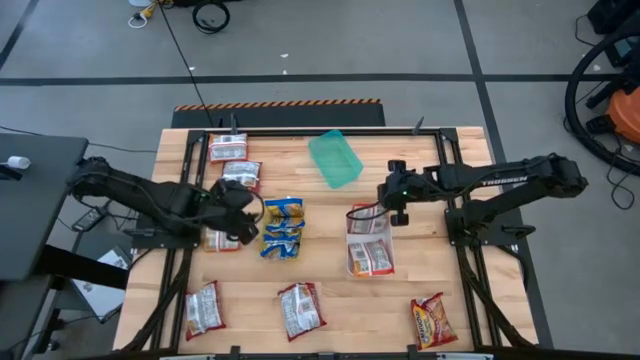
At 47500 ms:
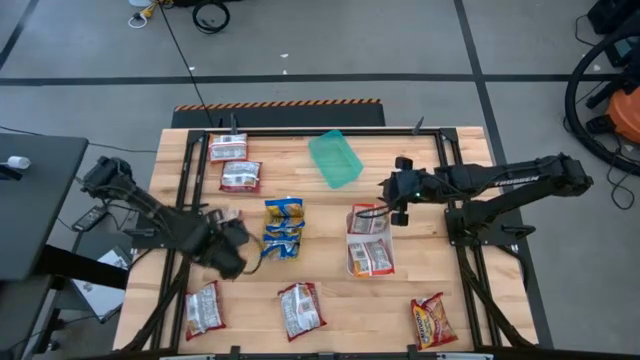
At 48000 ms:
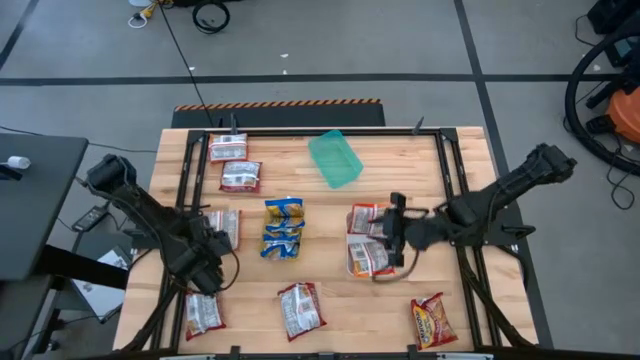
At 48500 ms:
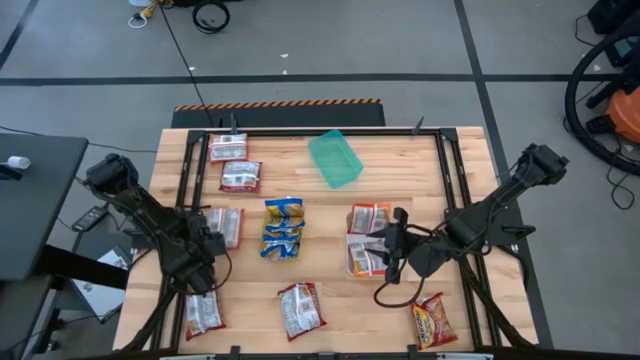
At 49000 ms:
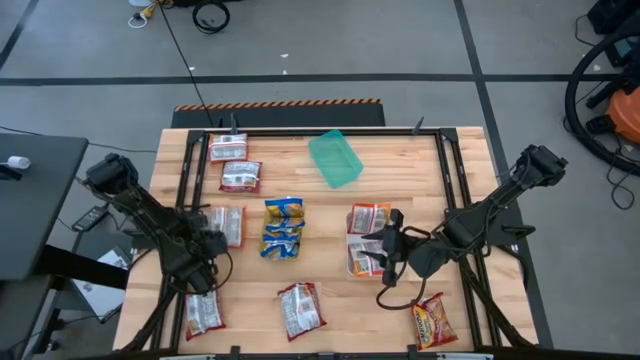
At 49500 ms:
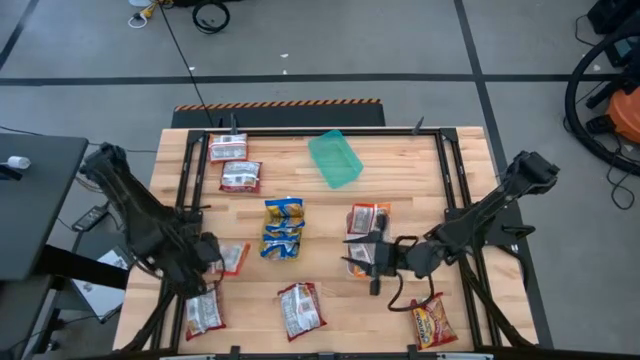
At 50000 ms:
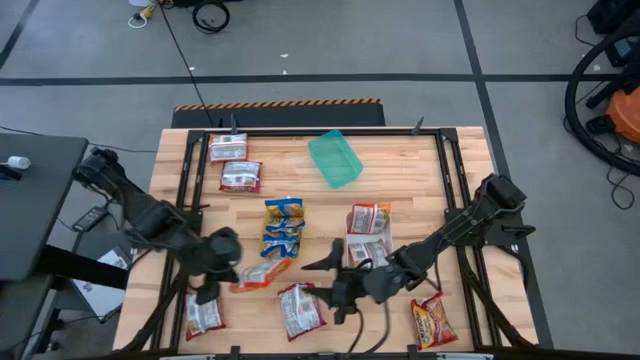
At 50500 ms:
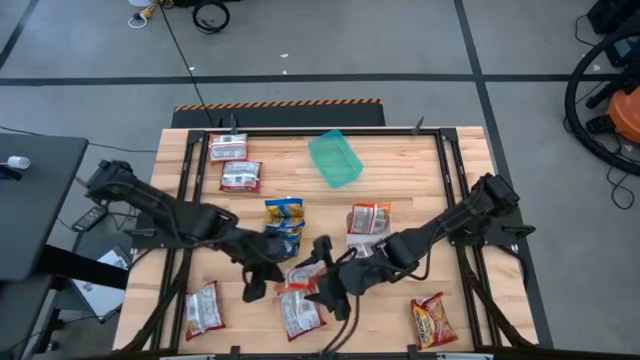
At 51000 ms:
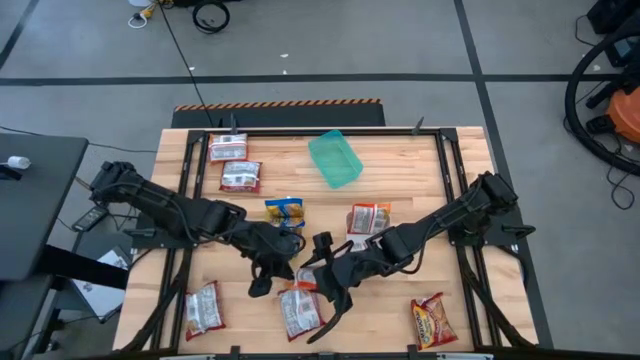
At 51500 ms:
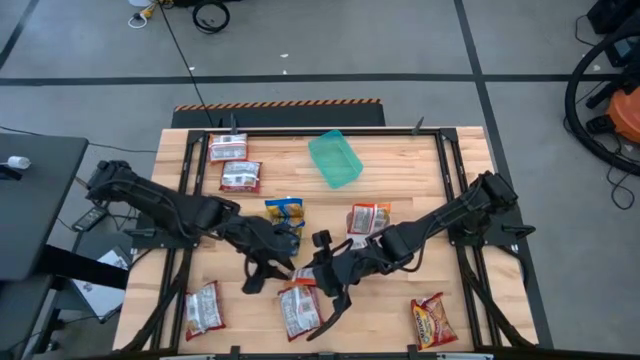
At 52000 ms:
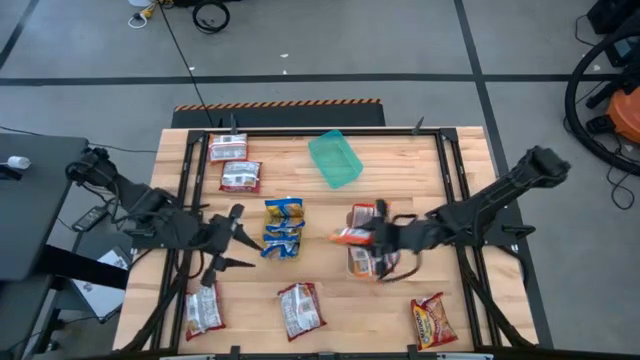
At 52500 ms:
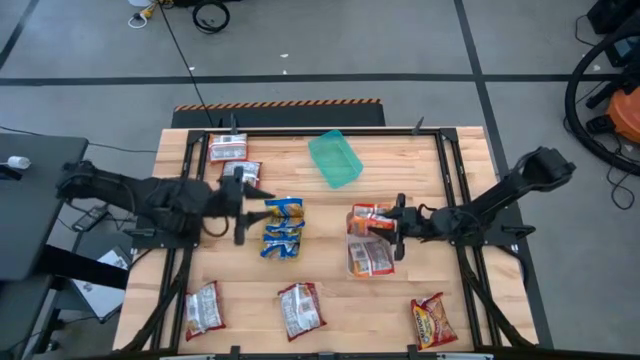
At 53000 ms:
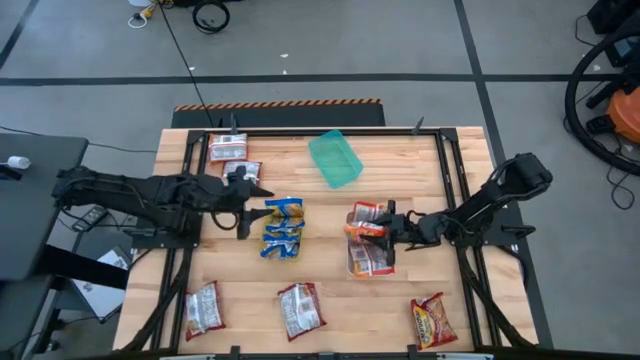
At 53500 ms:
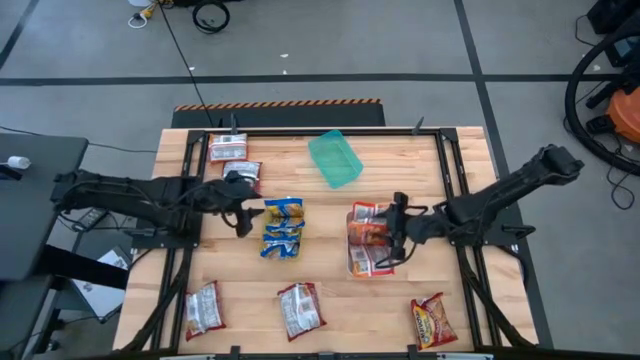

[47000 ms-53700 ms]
Task: Sort Maruchan noodles
Put the bottom left orange noodle pack into the white bin

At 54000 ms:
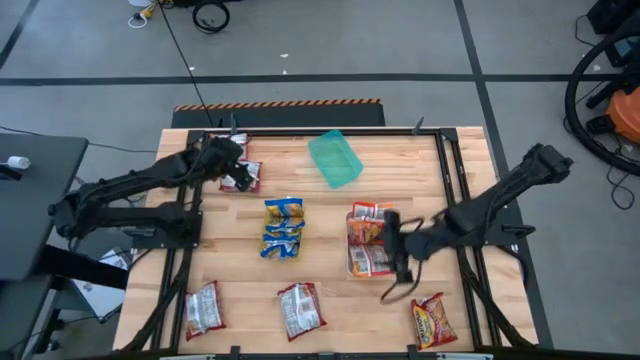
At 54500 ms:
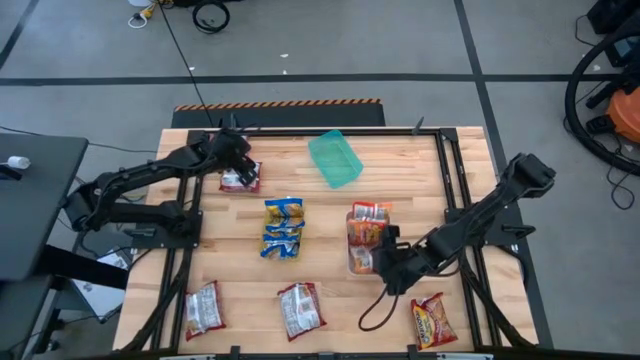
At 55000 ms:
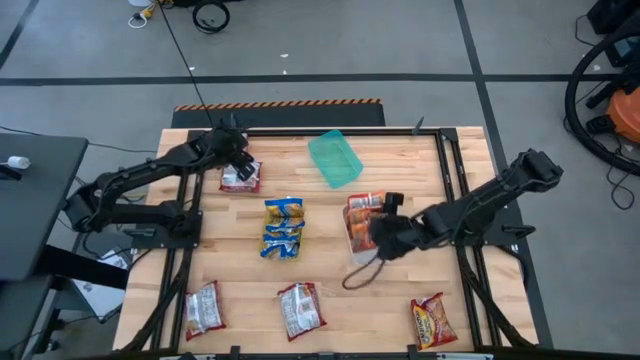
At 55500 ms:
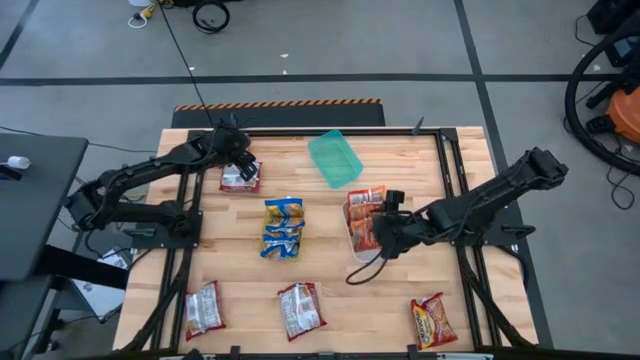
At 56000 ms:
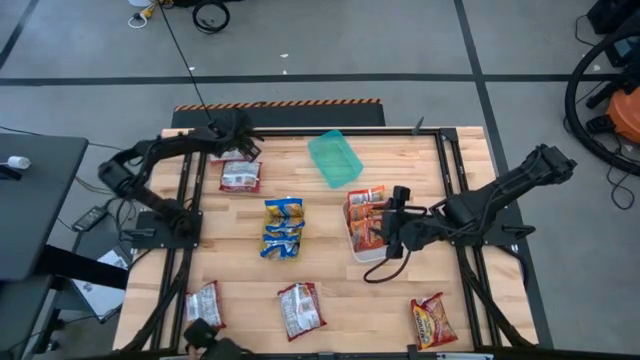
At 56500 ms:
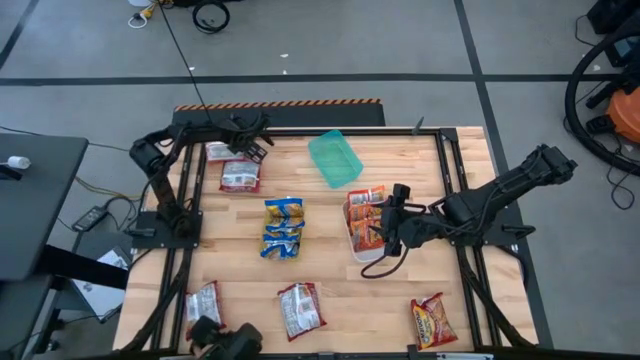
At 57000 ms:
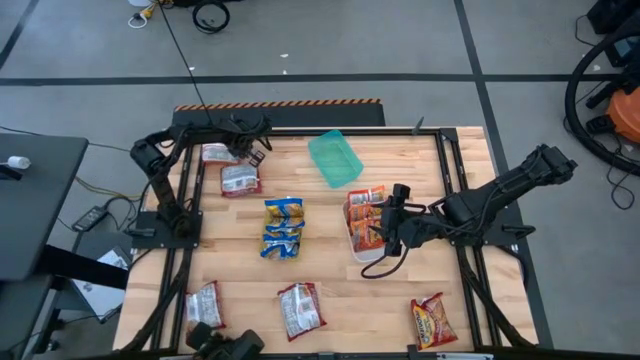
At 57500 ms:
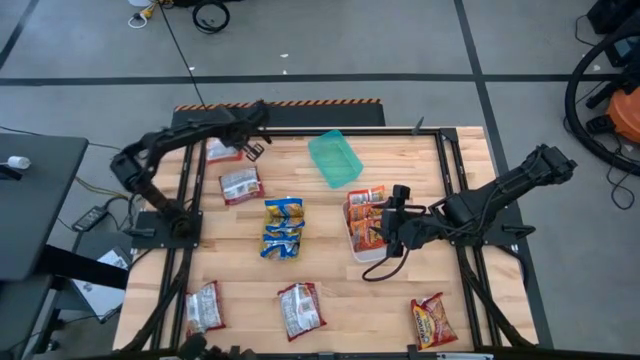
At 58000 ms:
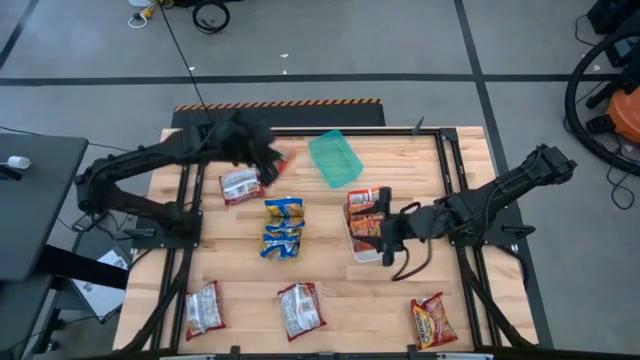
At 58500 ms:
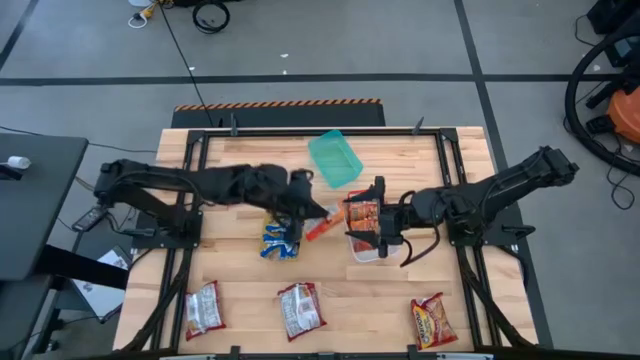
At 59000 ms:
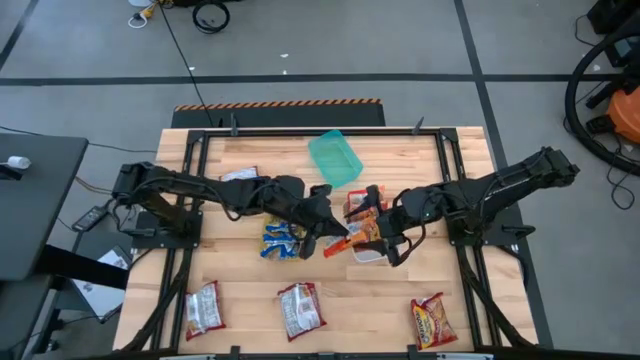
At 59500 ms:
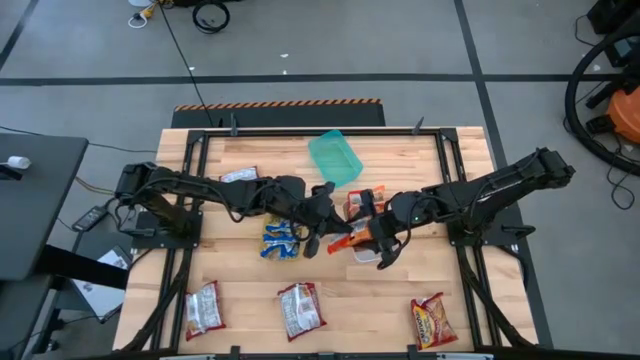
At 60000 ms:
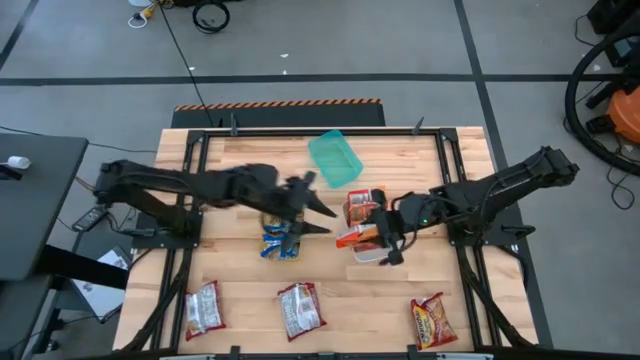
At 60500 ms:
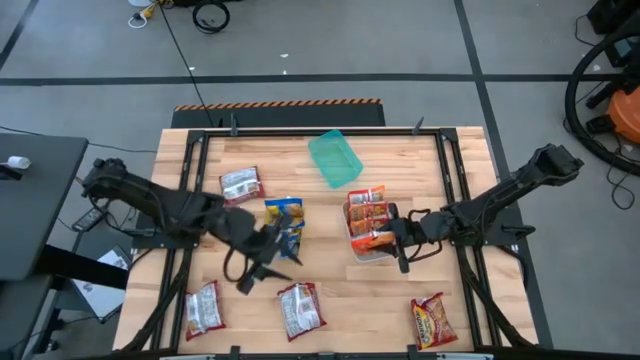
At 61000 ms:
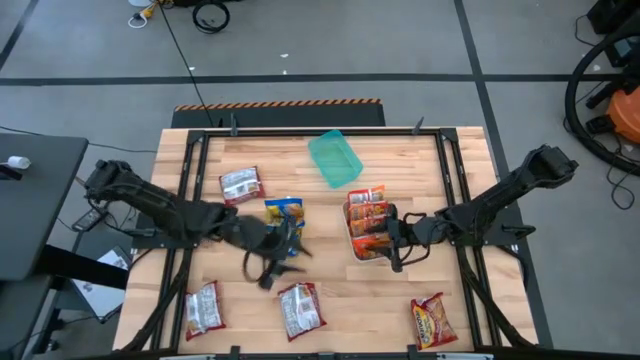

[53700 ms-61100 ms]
Put the orange noodle pack into the white bin

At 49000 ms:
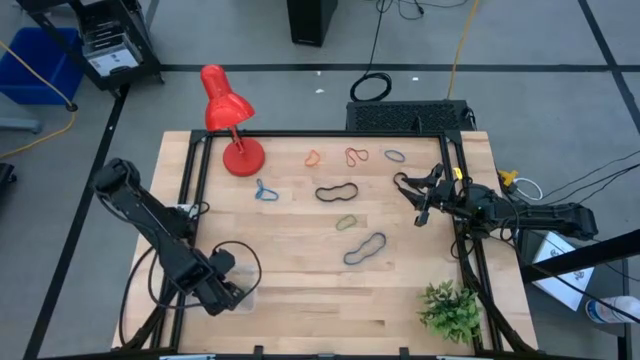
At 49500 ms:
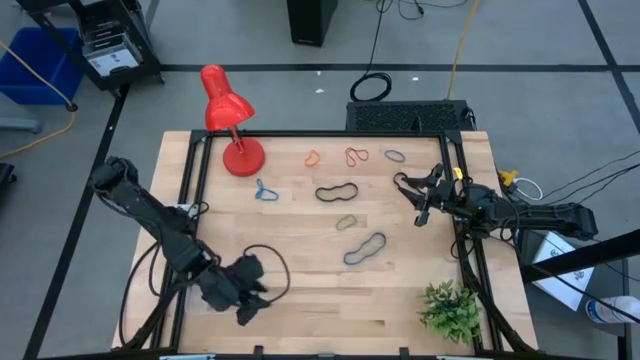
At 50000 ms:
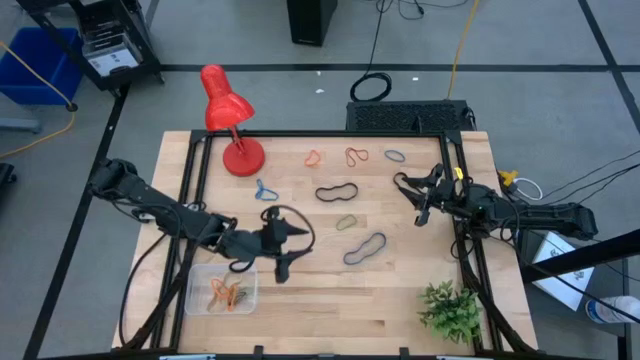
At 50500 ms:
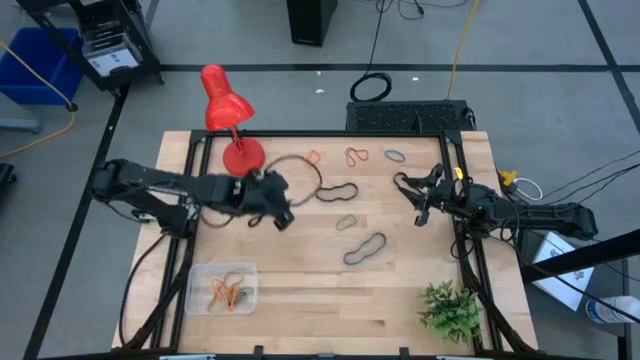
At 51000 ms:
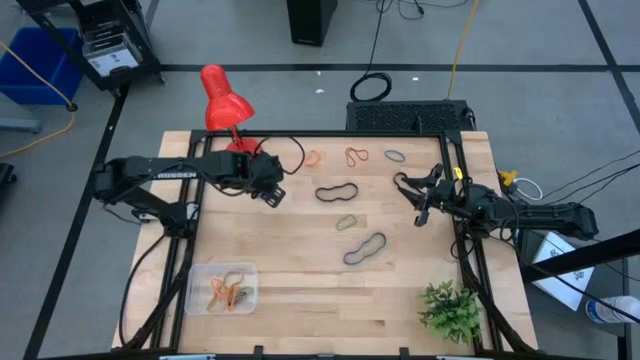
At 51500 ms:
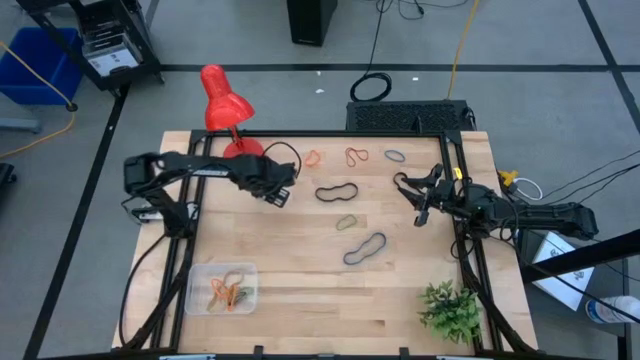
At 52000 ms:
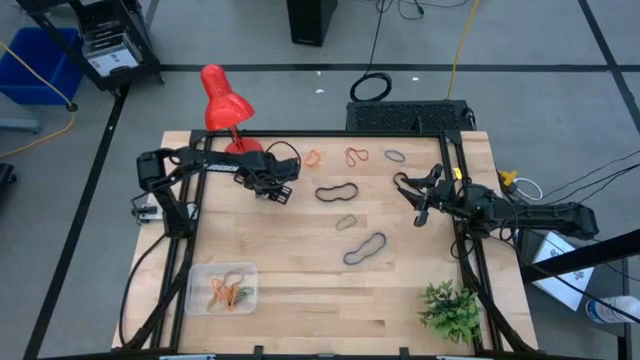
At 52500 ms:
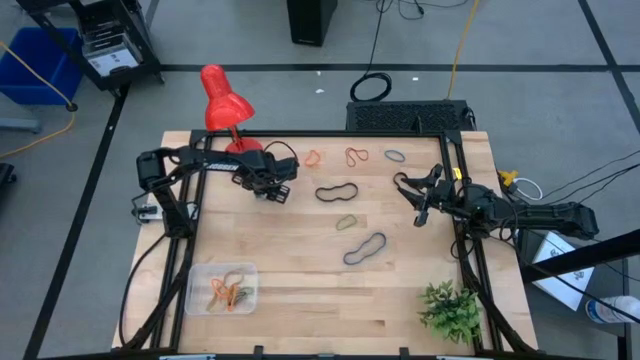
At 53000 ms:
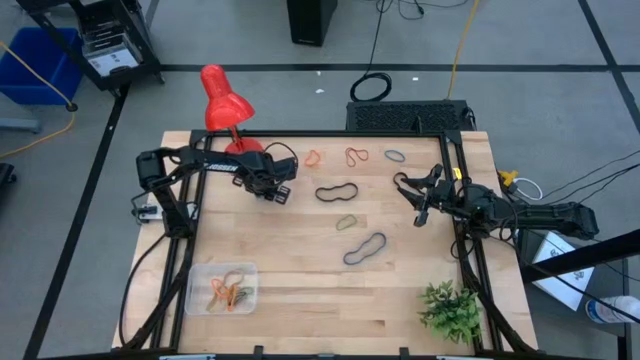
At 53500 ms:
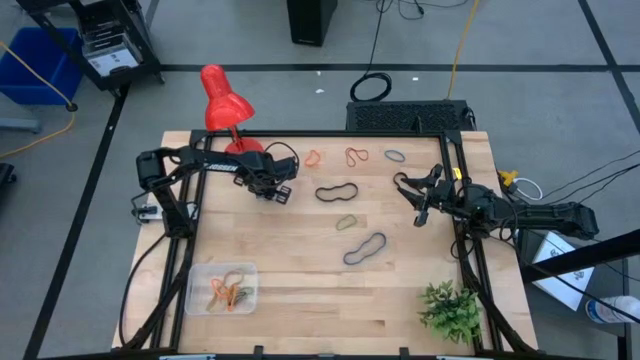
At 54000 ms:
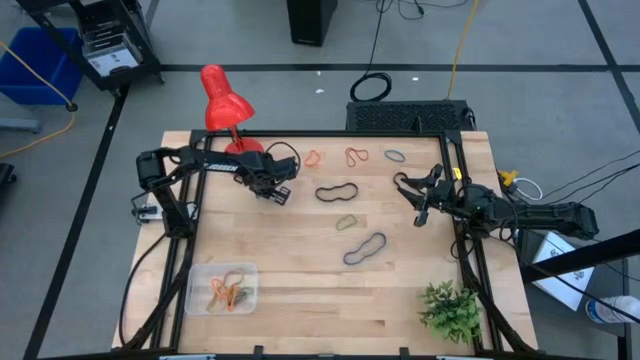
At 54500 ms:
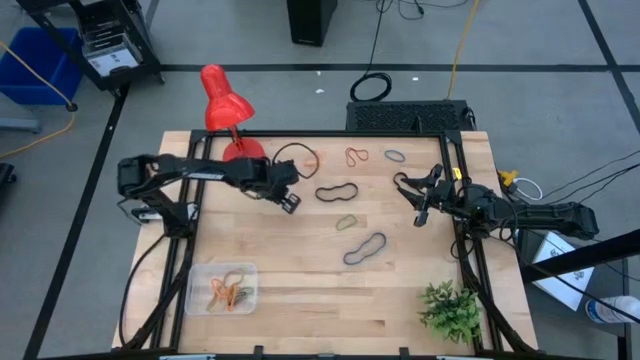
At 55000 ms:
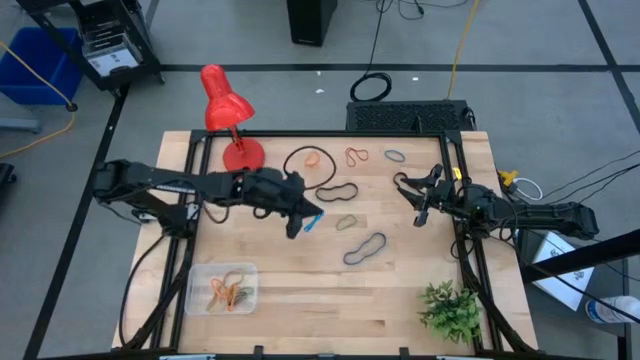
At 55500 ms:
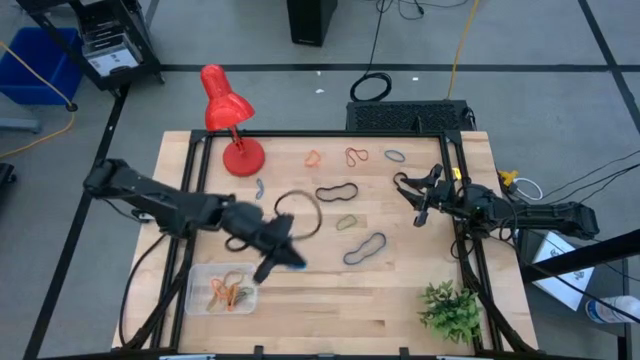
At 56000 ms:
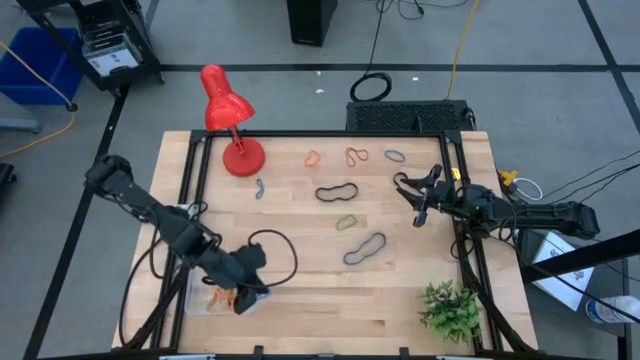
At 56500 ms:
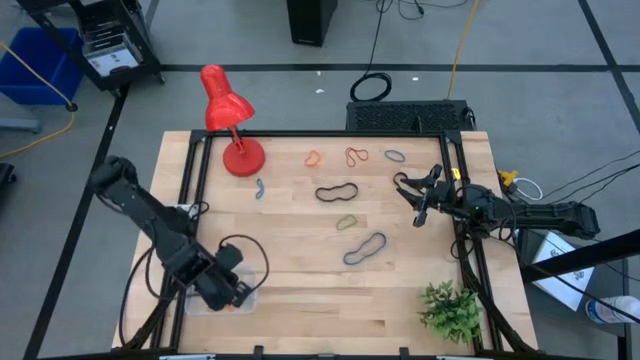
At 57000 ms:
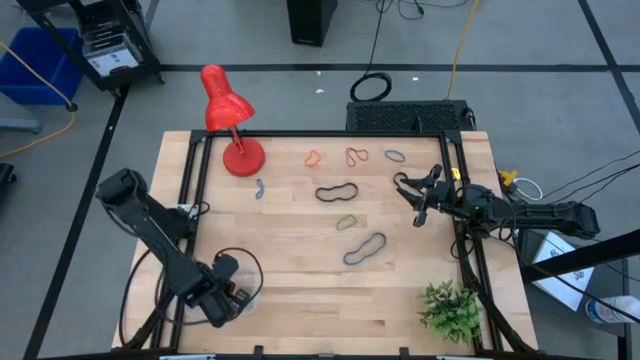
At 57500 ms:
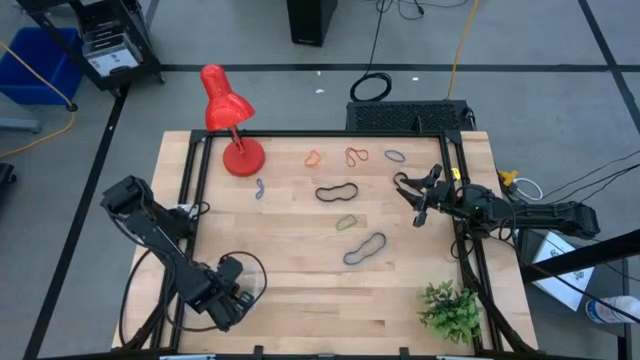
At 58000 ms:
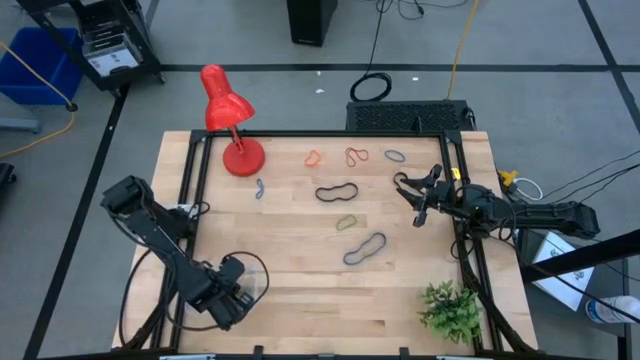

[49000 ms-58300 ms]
Task: Pick and place rubber bands into bin
Put the middle left blue rubber band into the transparent bin
